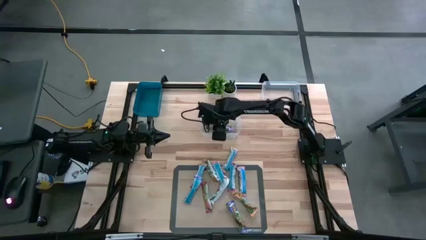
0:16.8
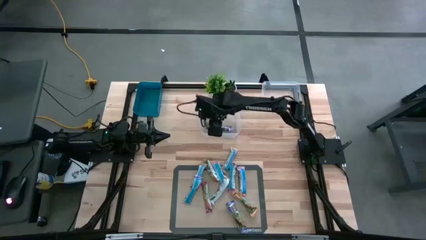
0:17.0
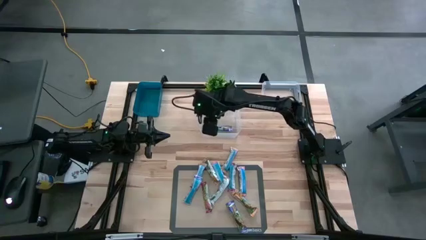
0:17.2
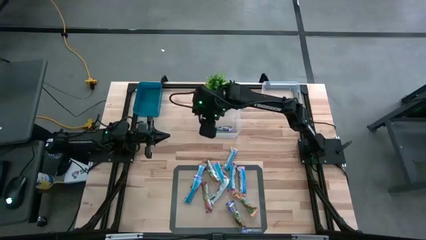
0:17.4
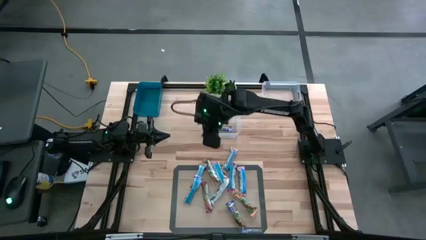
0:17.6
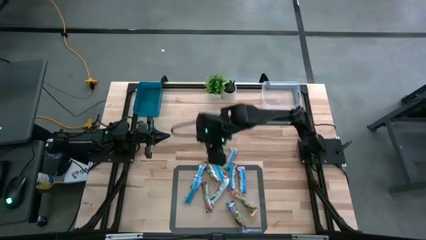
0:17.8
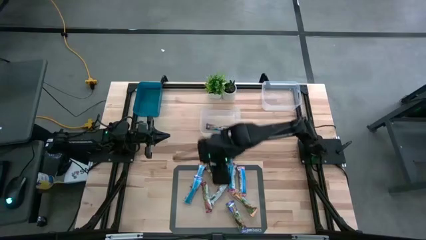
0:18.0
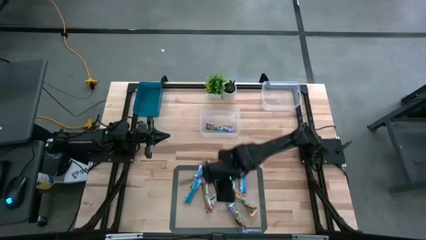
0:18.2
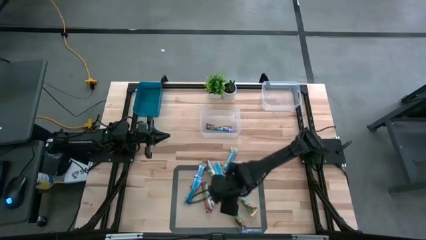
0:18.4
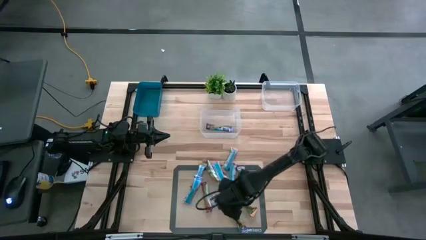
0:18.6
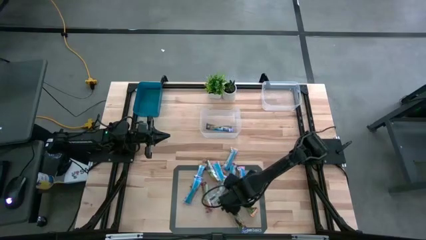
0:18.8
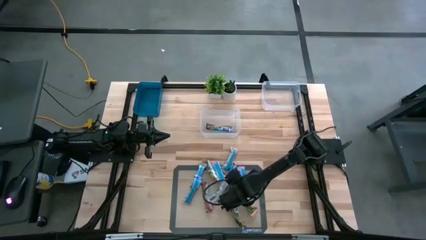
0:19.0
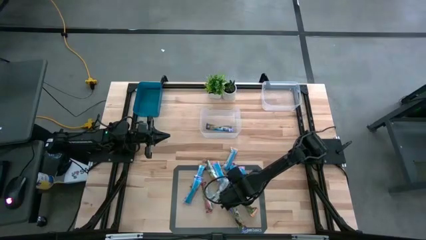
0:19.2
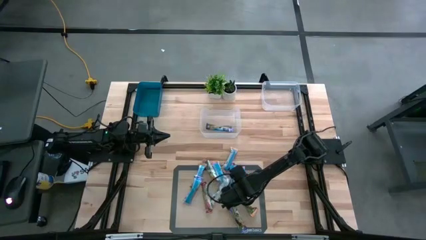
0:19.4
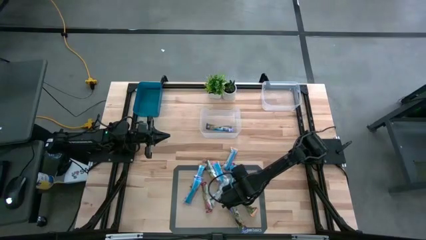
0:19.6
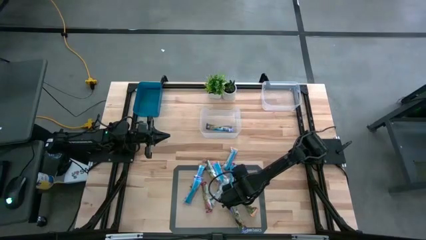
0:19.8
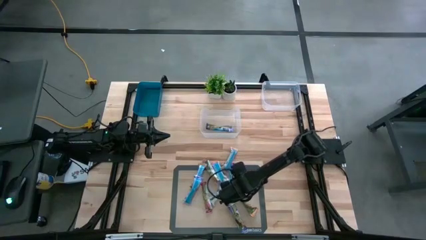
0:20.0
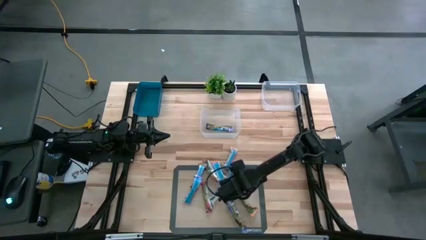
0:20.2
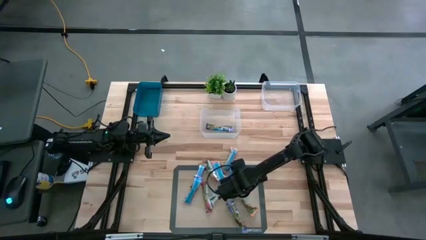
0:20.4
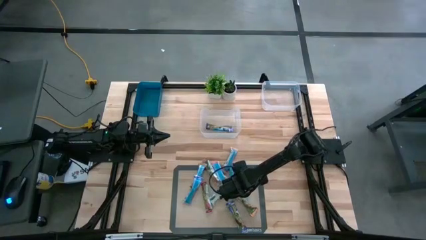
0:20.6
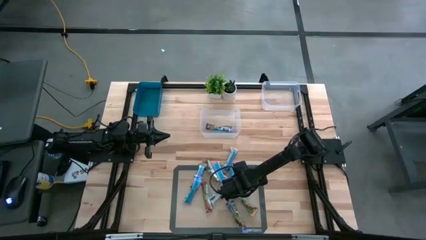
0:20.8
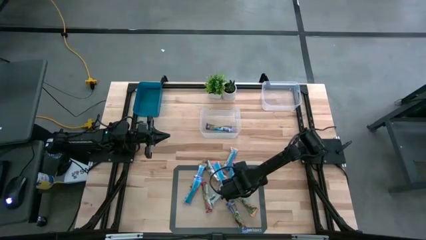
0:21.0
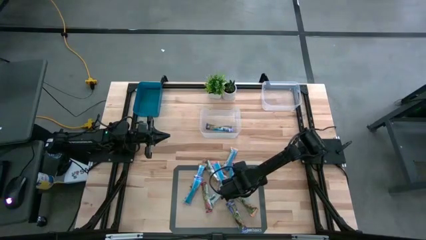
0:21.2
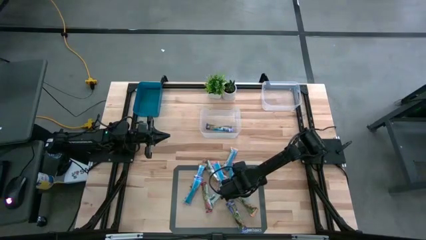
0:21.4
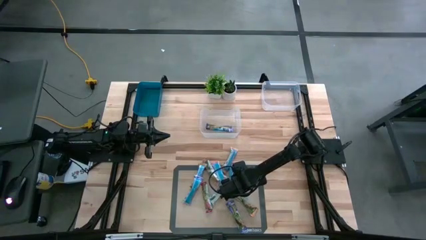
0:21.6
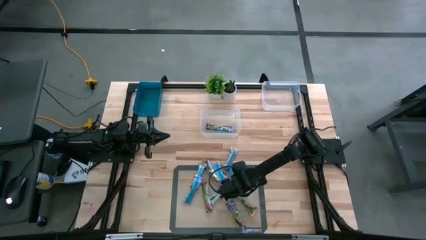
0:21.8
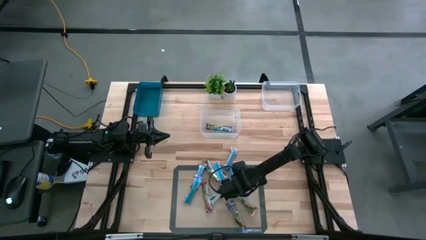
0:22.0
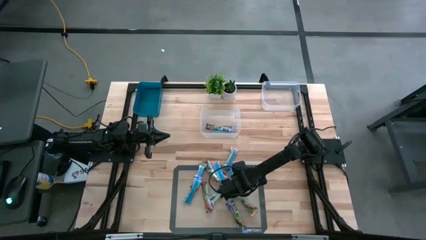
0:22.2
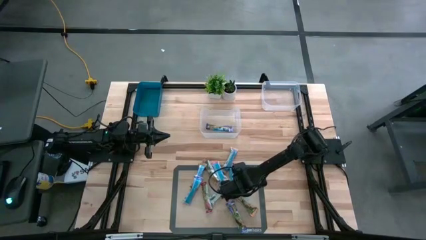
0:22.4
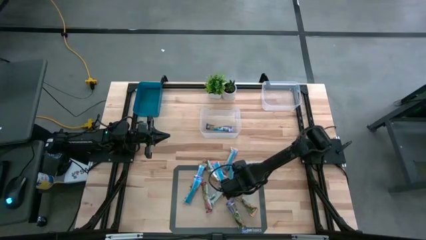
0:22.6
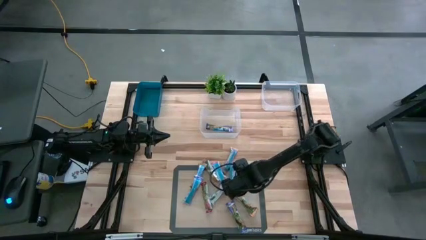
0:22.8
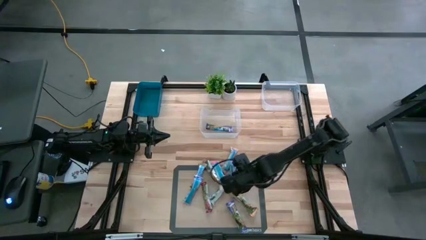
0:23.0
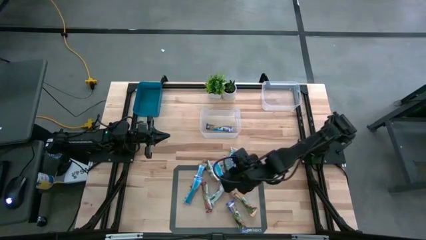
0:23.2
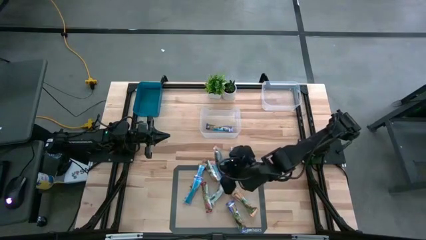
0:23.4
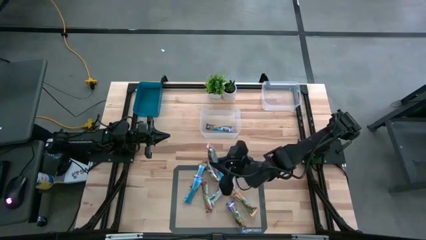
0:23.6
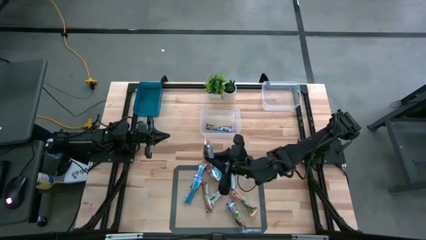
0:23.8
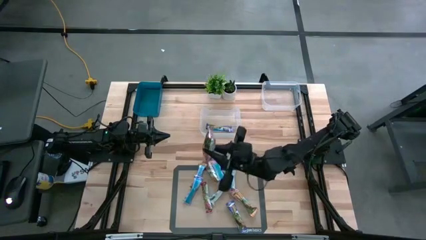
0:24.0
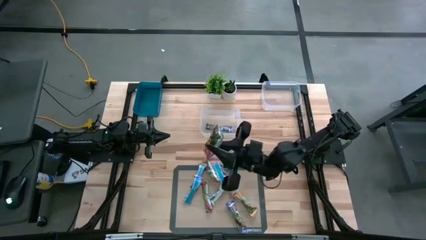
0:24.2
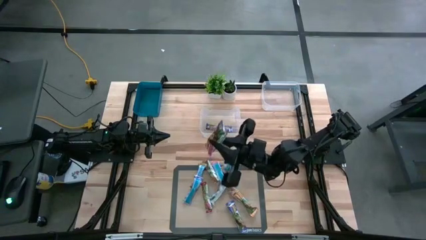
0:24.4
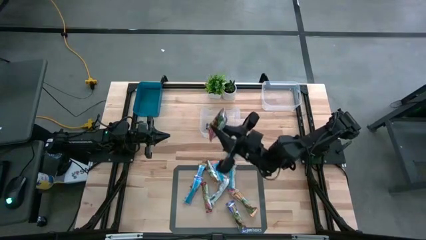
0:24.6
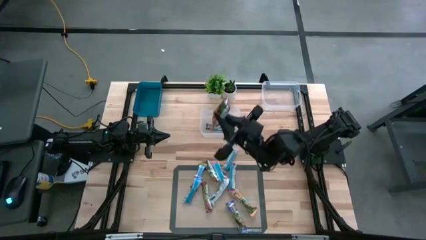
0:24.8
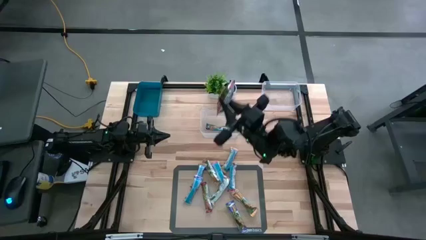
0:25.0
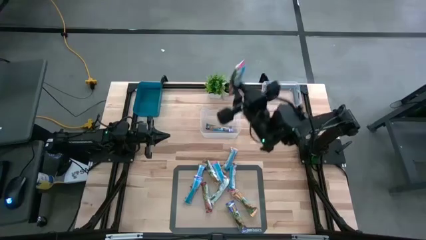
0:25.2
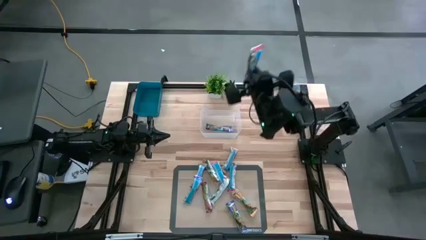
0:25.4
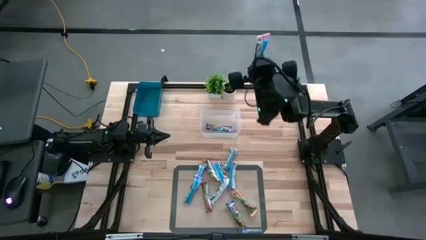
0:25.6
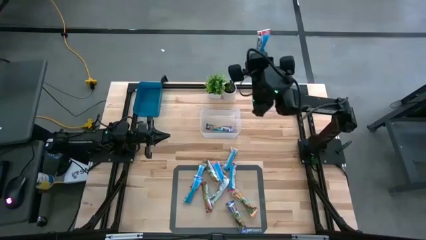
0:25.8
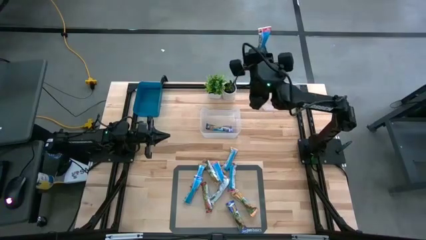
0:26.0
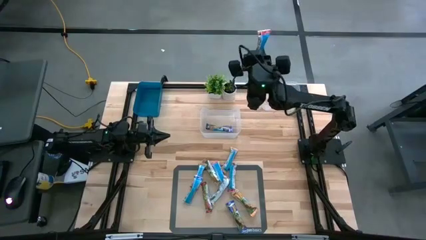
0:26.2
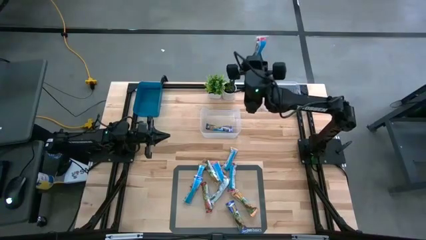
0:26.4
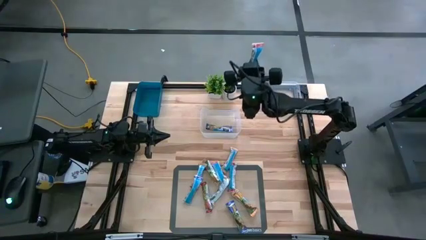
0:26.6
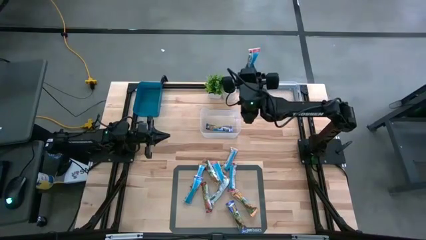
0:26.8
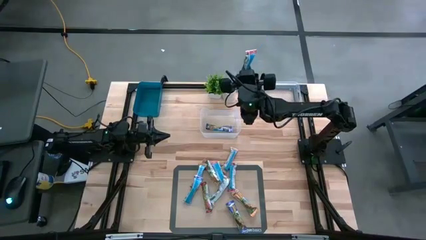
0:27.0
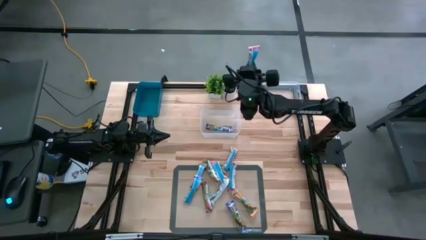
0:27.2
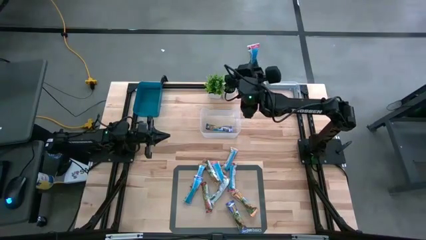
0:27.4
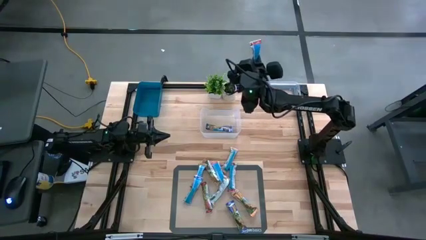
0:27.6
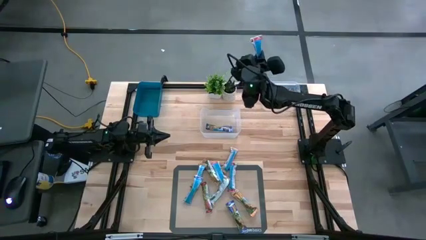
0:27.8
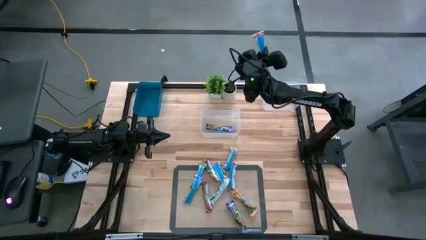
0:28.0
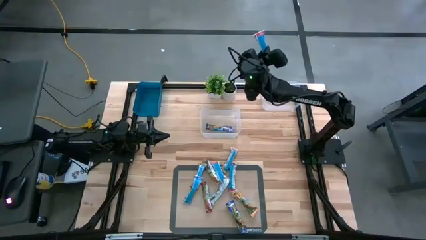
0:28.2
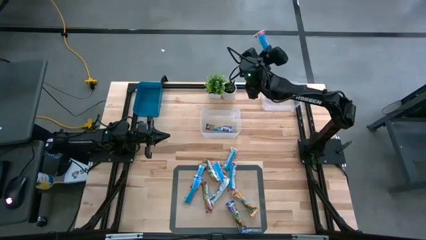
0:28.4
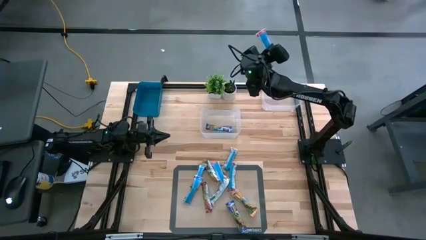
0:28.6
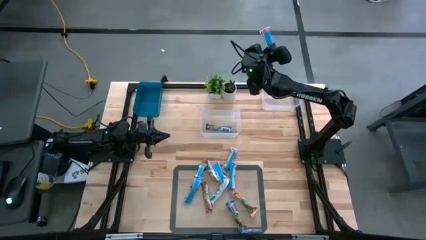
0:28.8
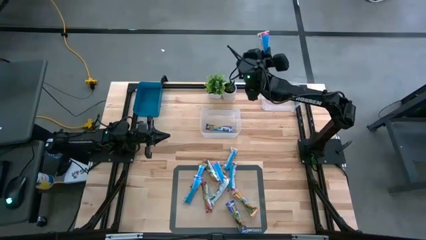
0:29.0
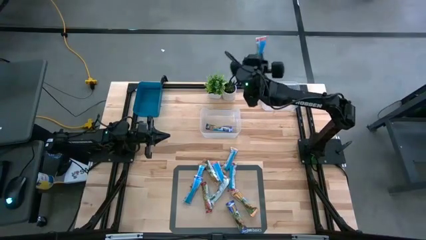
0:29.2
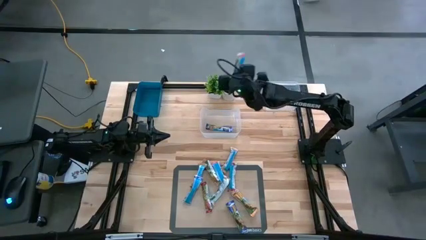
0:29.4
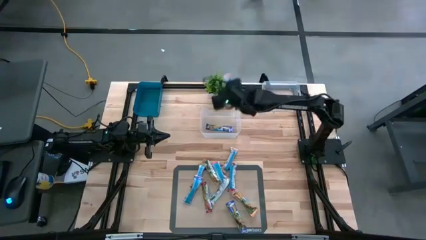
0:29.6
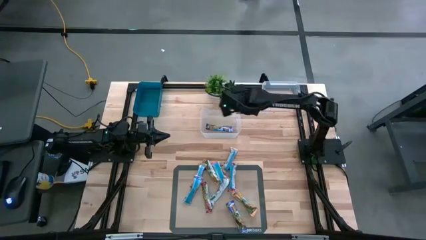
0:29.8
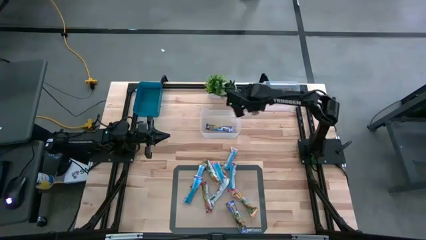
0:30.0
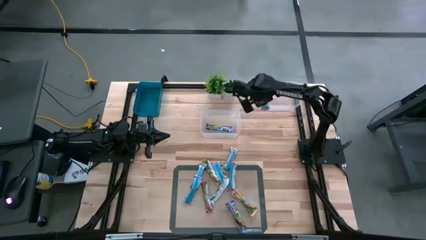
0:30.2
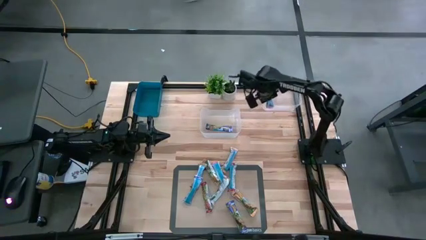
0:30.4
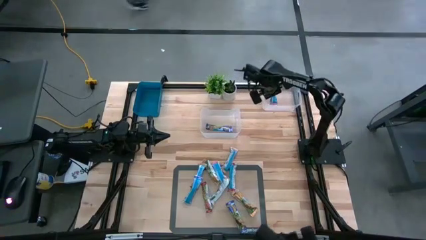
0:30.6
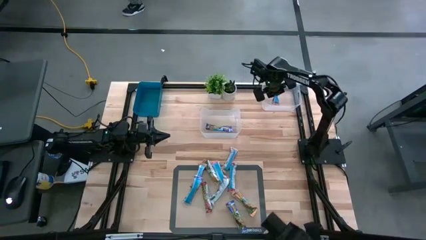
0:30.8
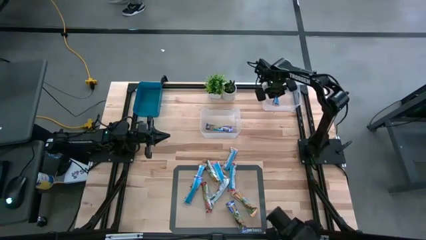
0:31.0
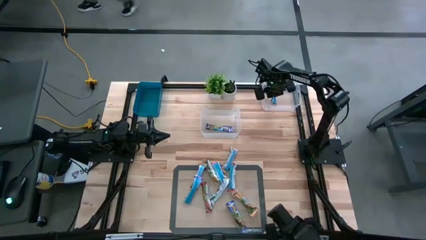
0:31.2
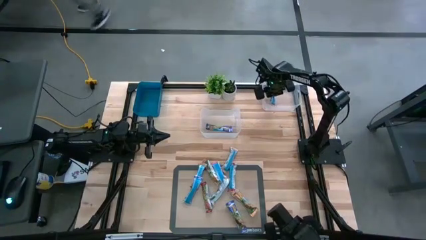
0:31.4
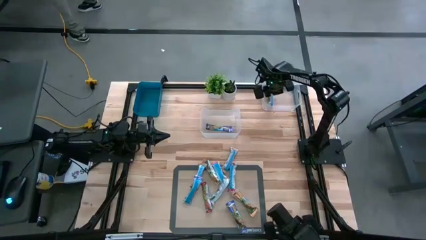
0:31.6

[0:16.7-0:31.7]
Task: Pick and place Granola Bars by type
Put the red granola bar in the right transparent bin
